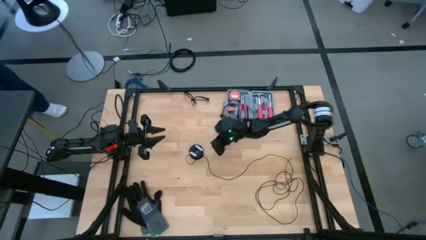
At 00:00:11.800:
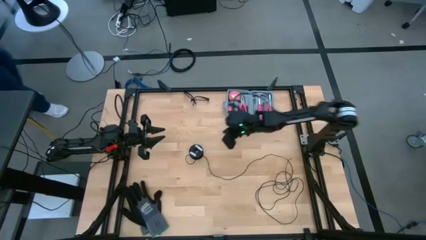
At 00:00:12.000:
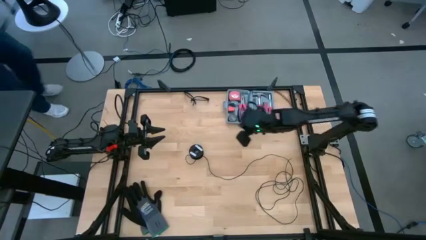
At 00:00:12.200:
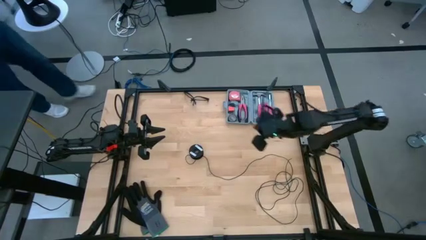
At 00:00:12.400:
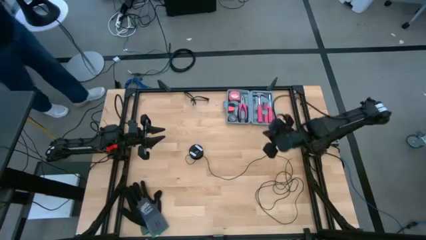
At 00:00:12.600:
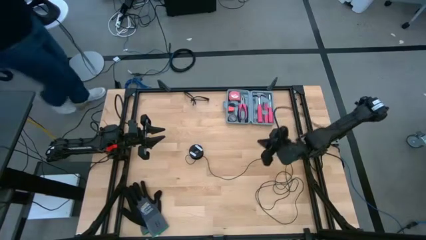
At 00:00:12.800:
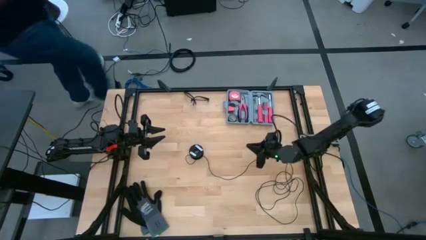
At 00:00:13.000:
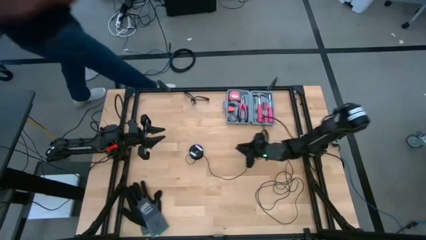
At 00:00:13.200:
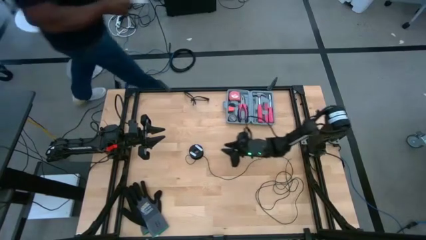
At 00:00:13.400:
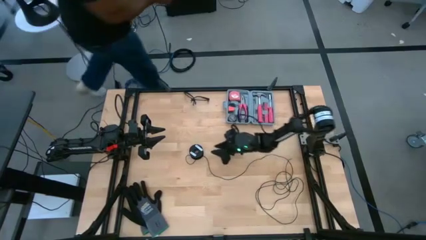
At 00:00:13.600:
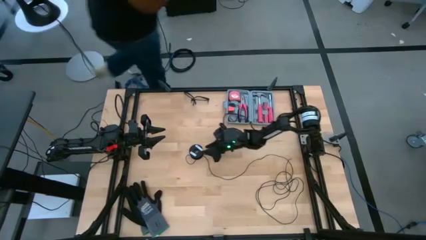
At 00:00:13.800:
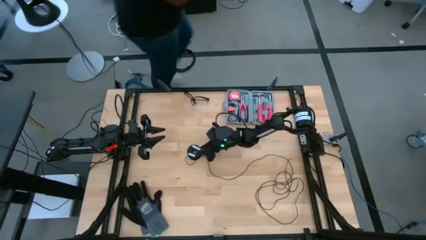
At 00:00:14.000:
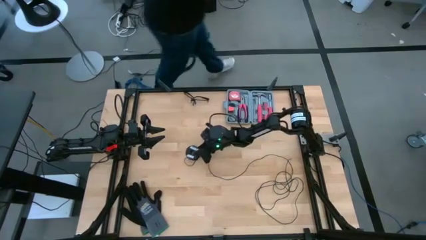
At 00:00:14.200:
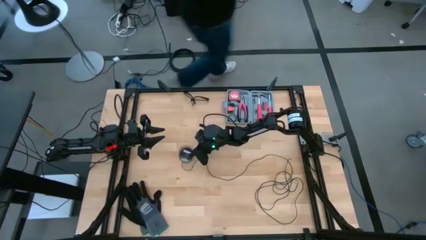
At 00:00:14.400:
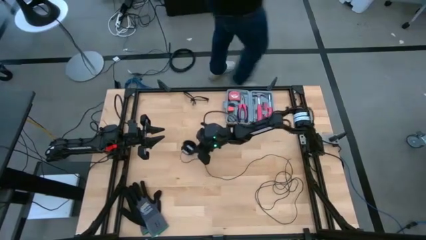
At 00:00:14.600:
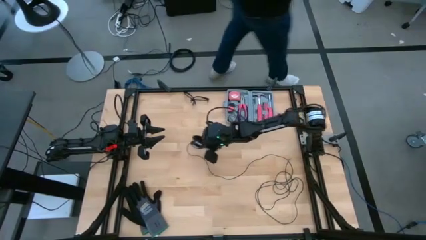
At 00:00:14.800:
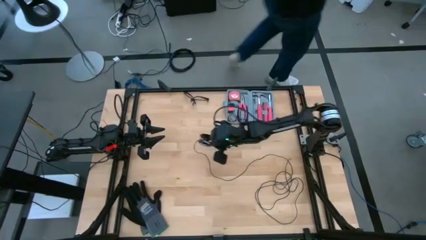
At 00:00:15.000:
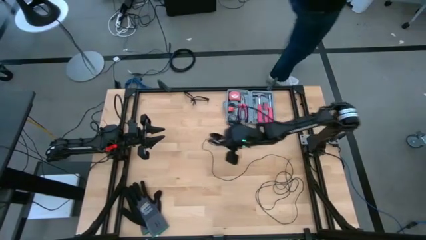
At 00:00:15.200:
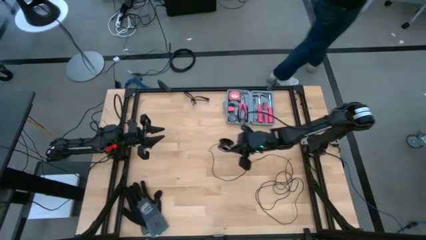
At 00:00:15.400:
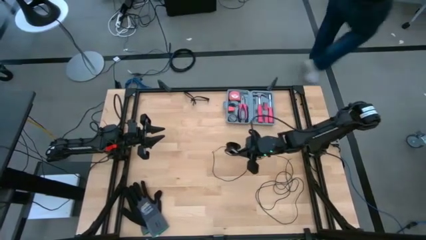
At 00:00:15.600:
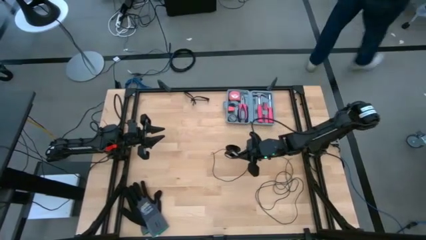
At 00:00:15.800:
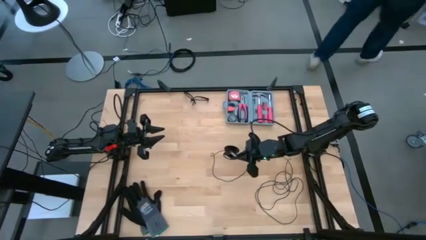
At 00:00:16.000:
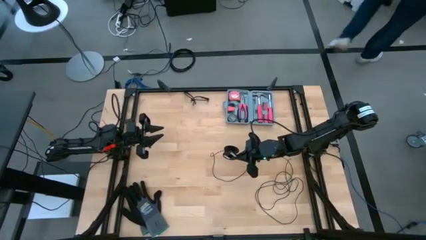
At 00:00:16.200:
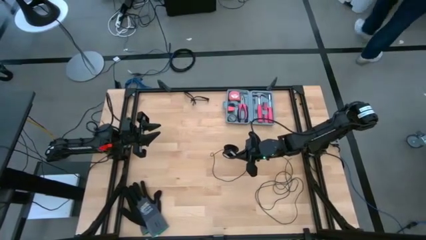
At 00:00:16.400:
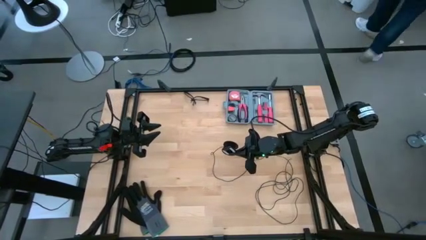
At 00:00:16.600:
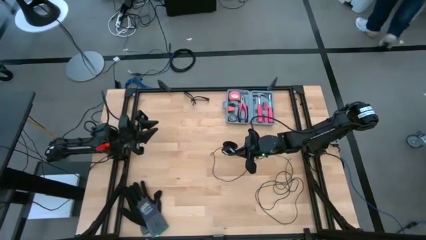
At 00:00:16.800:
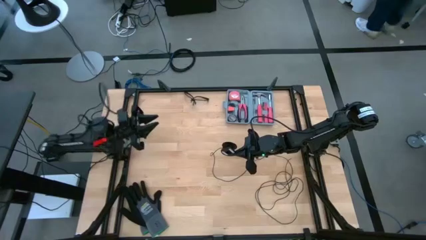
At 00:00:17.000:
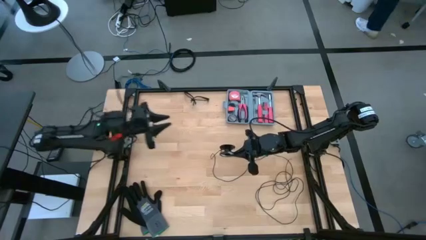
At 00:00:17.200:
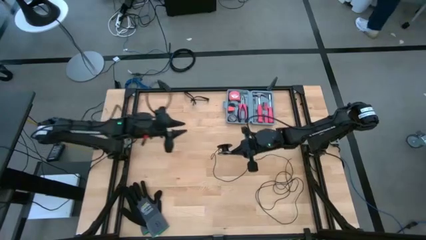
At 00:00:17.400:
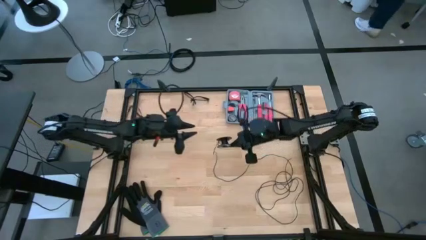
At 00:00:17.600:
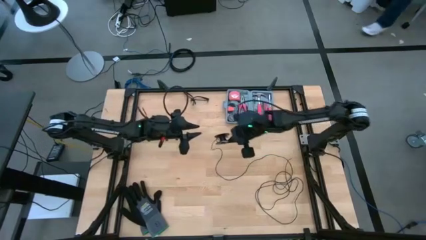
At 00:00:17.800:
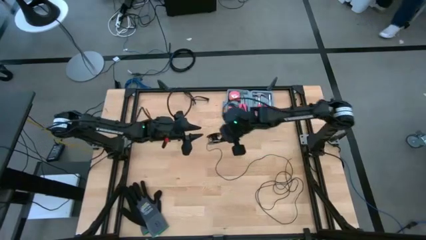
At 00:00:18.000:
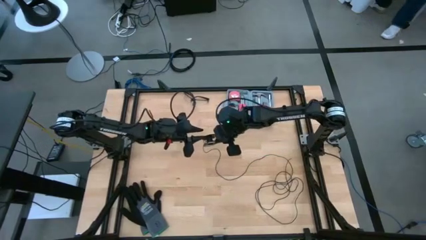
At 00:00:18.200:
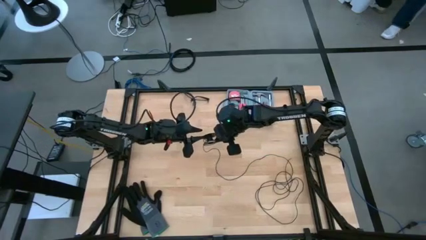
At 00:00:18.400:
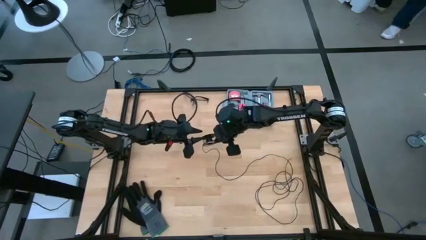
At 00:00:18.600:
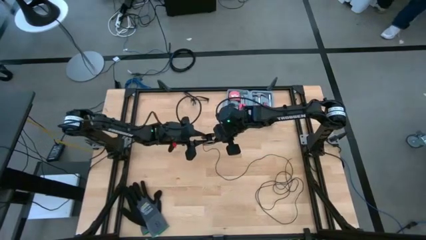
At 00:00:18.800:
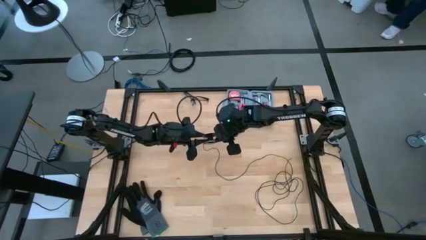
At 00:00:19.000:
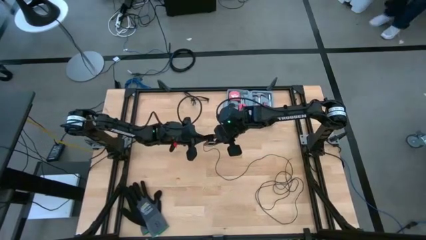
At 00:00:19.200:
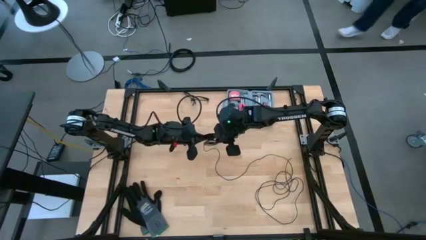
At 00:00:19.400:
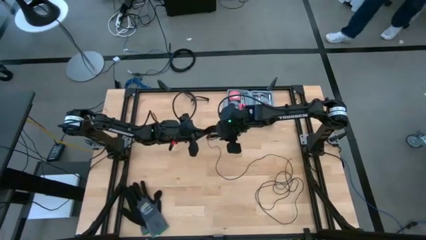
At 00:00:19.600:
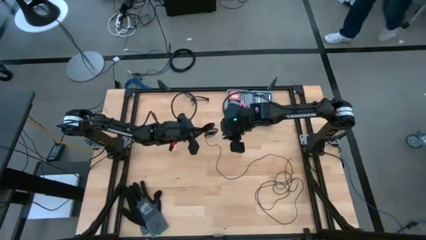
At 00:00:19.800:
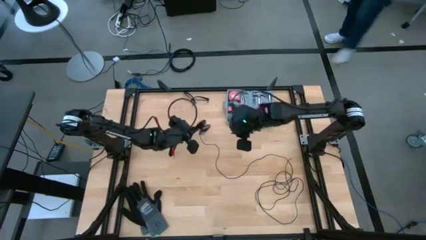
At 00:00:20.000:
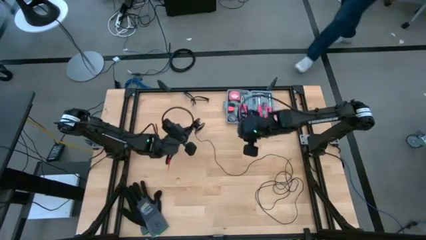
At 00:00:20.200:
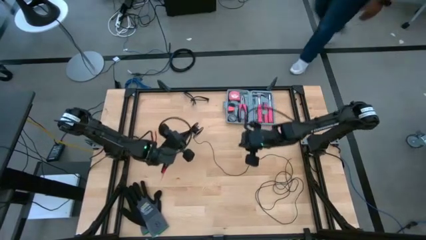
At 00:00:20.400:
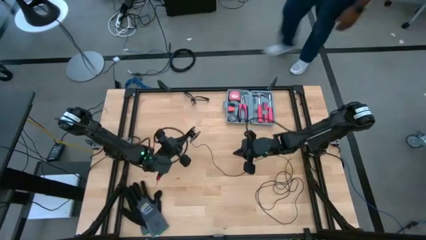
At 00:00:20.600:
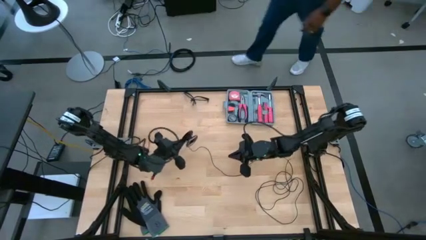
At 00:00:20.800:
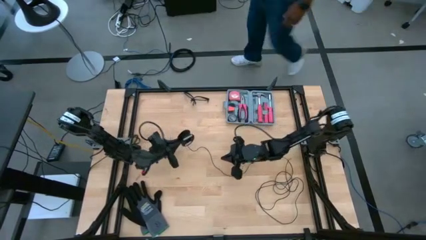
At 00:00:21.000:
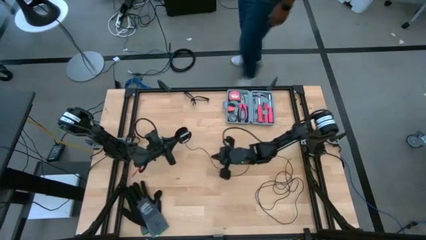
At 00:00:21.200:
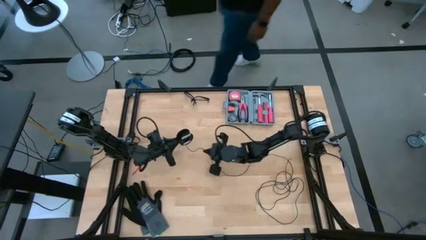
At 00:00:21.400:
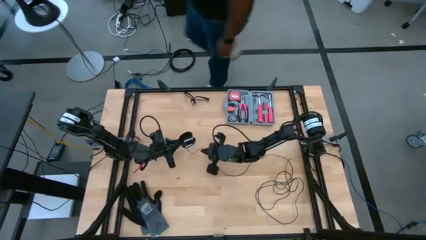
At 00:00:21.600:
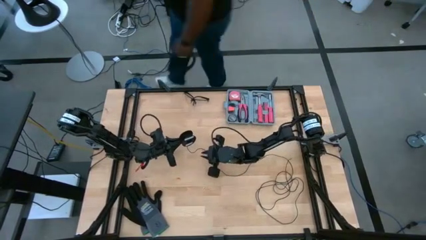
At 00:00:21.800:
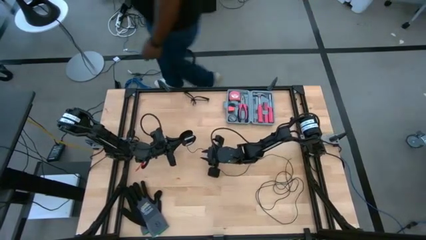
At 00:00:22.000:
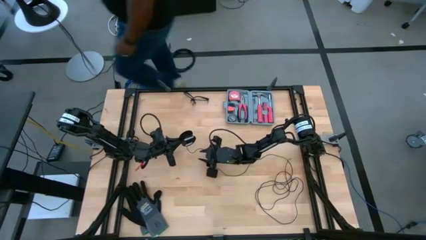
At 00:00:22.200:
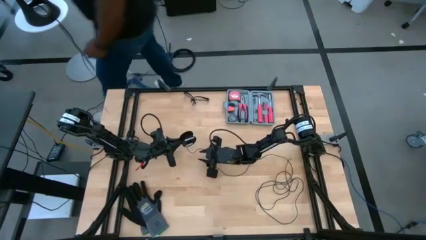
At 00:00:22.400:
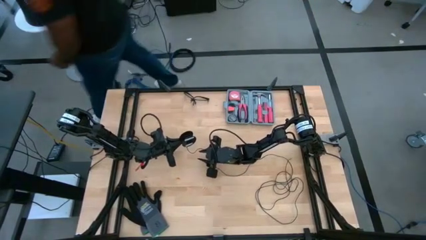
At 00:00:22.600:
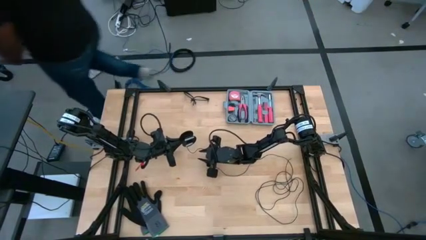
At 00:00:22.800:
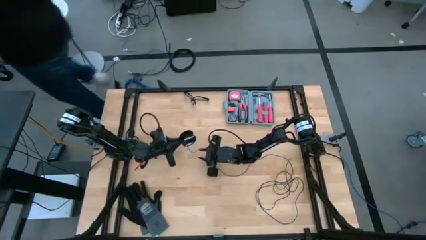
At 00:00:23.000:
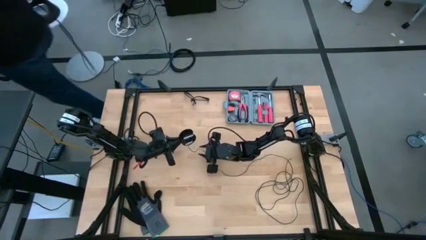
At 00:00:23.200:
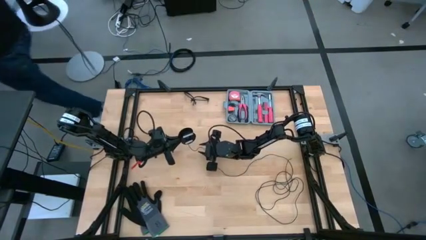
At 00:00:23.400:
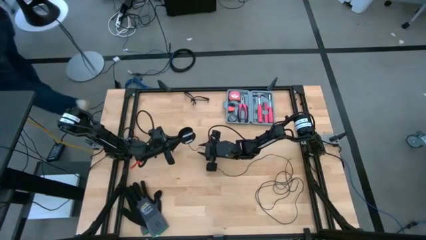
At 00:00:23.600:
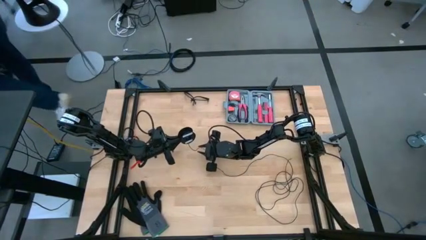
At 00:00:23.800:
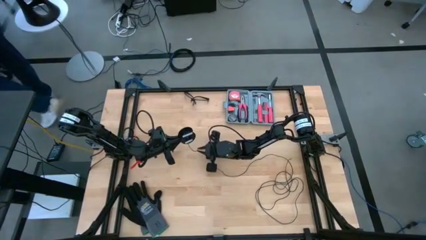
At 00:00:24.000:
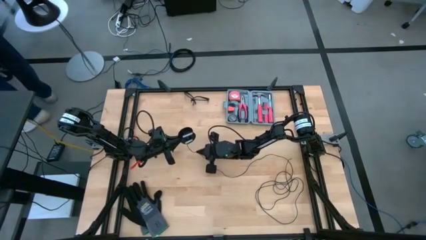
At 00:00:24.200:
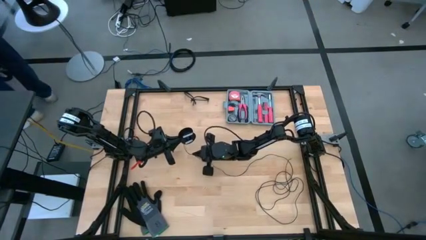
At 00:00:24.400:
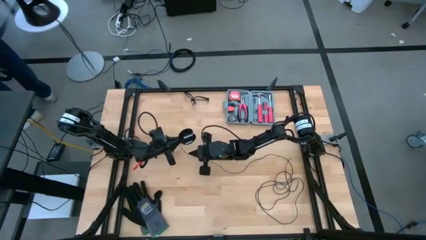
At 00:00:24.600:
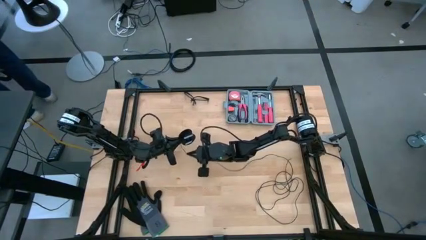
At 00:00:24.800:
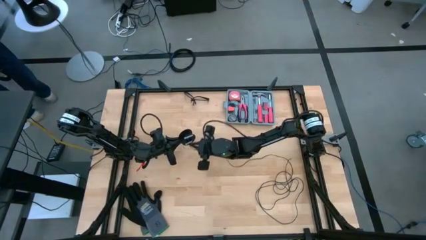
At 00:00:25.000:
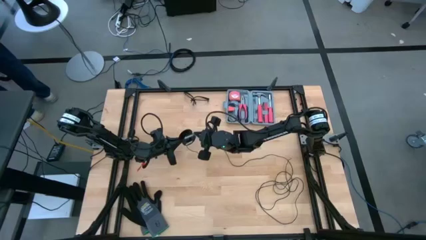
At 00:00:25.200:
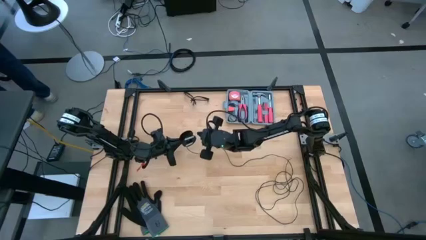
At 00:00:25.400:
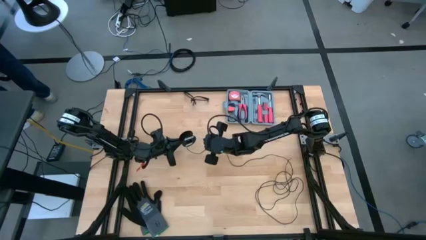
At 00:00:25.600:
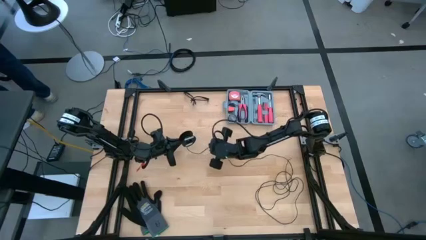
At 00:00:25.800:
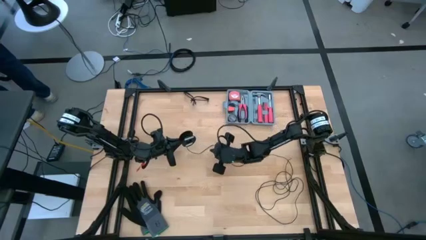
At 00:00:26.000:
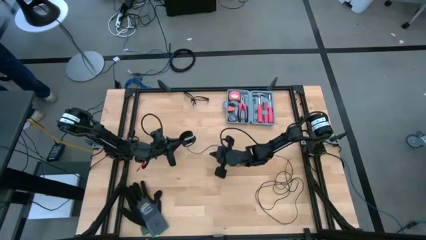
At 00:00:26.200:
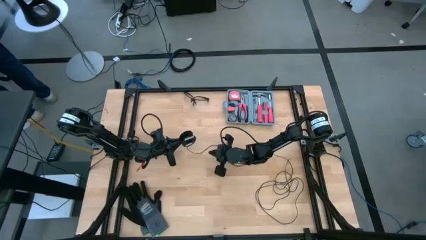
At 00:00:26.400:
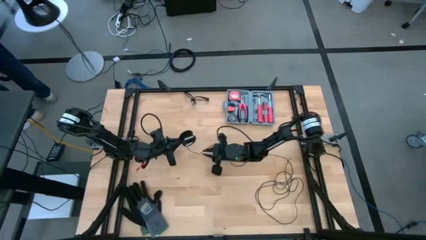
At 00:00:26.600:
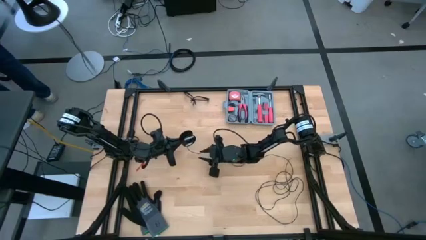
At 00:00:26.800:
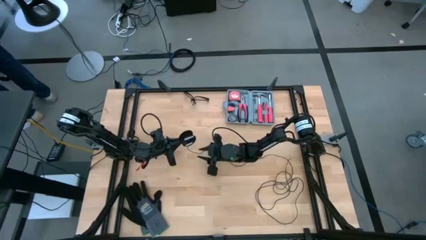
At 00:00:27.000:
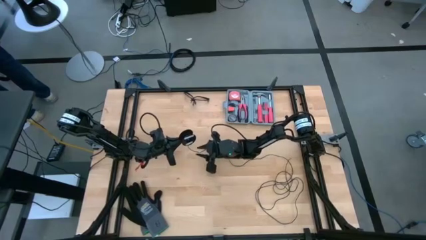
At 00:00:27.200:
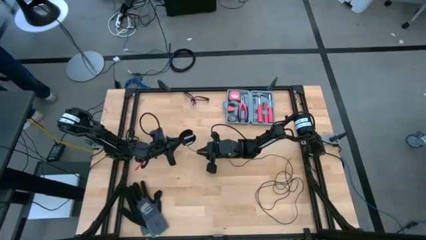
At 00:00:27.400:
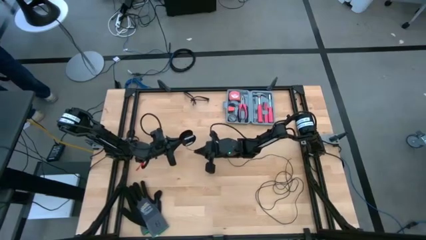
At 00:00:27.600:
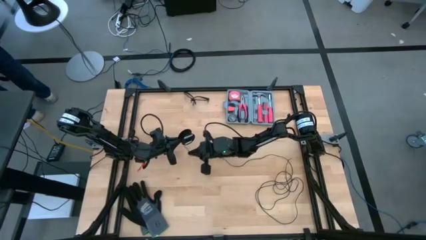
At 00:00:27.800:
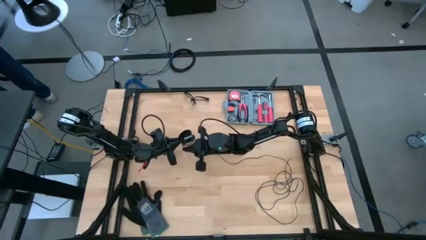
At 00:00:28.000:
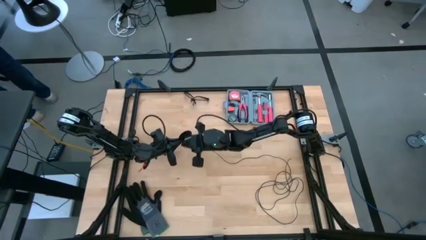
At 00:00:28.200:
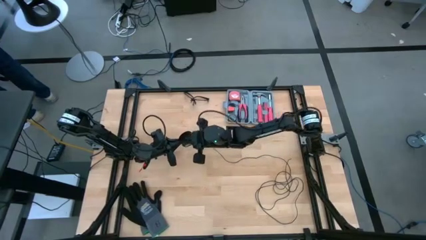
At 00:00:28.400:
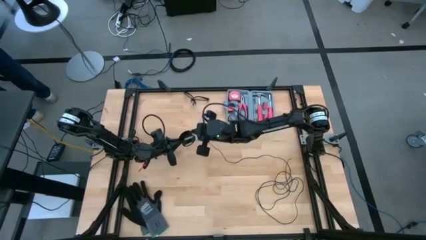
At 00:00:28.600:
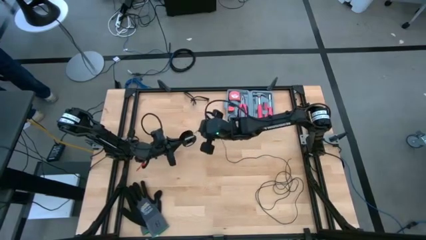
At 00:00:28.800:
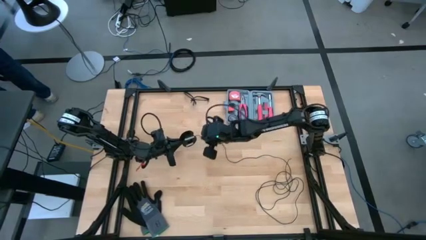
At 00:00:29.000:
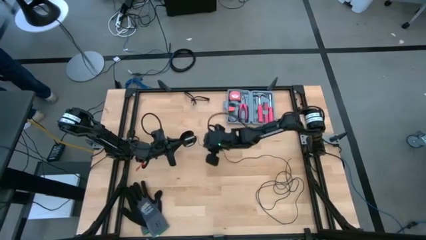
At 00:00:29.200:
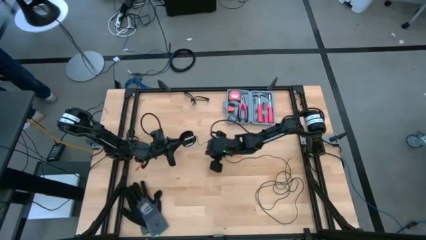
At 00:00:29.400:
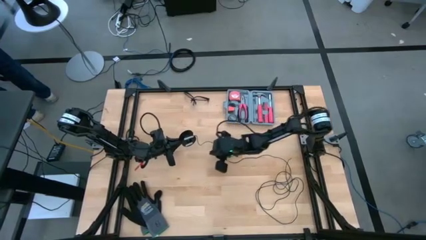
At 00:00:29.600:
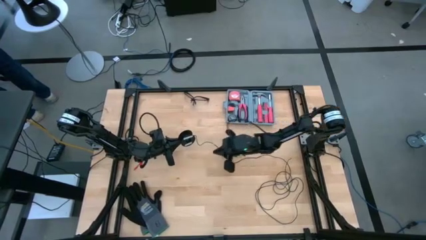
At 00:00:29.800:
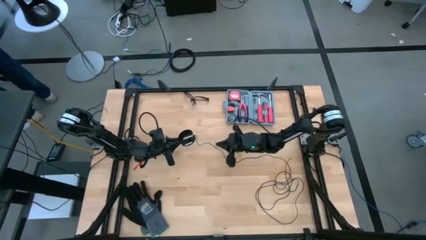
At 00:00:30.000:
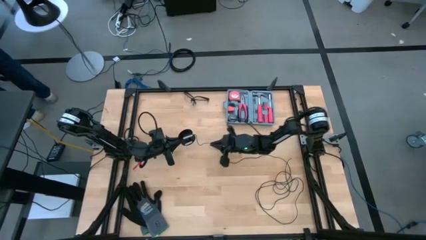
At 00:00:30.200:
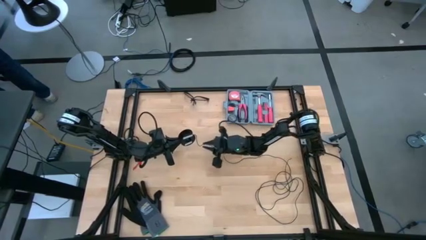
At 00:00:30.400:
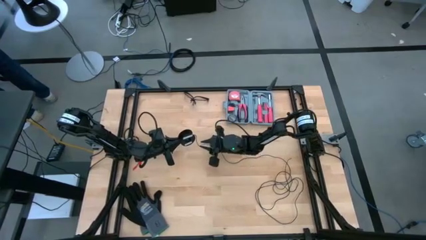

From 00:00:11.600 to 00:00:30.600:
Task: Coil cords
Coil the black wire onto the spool
